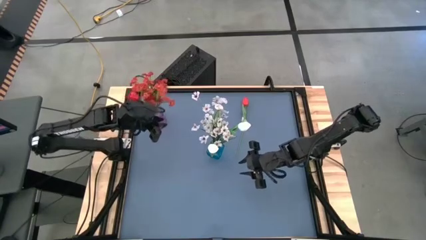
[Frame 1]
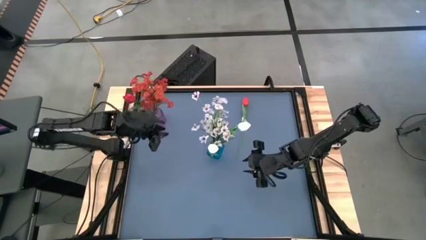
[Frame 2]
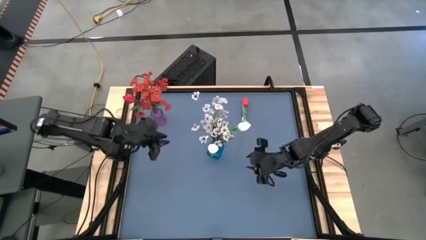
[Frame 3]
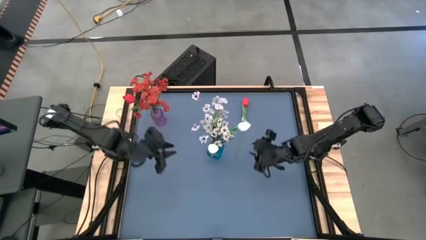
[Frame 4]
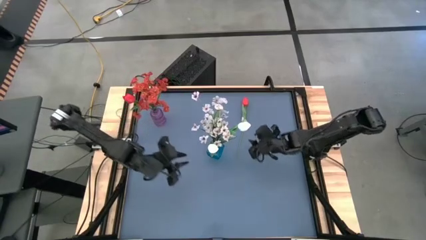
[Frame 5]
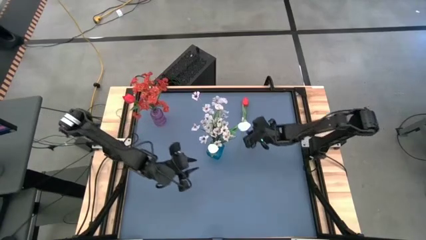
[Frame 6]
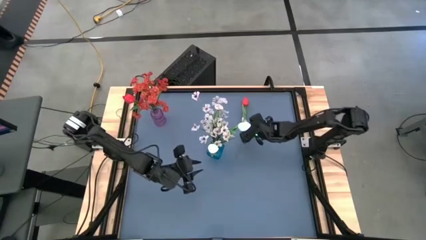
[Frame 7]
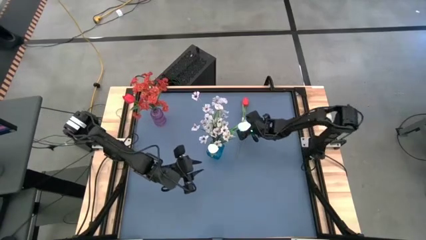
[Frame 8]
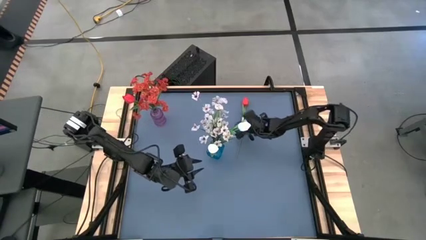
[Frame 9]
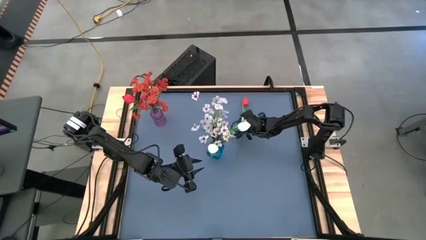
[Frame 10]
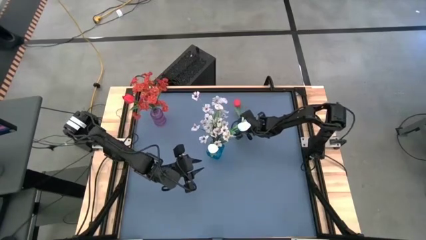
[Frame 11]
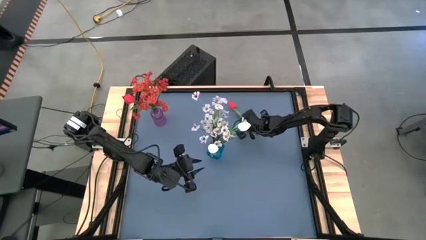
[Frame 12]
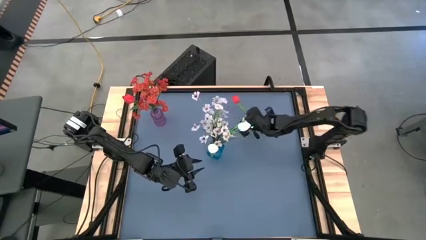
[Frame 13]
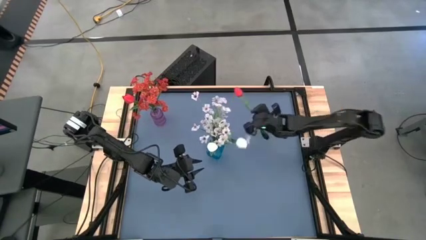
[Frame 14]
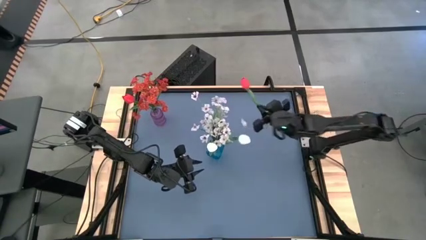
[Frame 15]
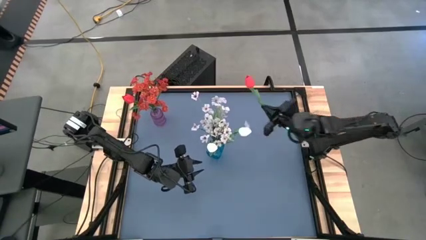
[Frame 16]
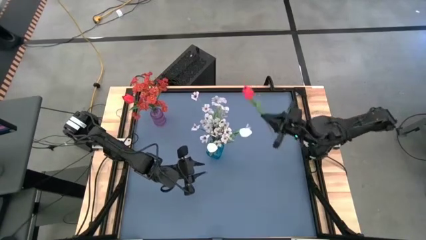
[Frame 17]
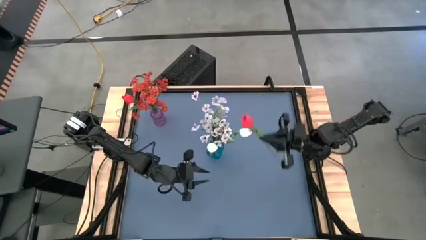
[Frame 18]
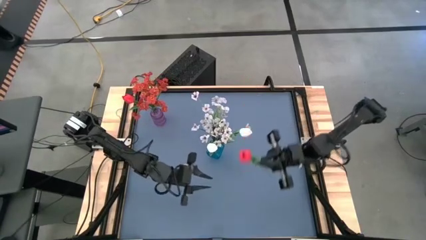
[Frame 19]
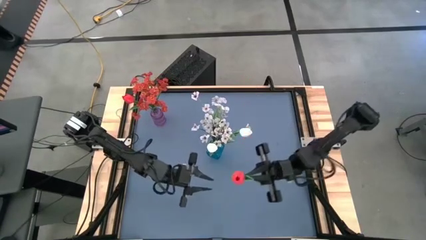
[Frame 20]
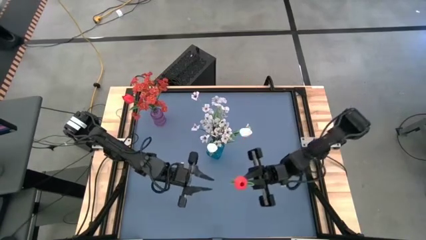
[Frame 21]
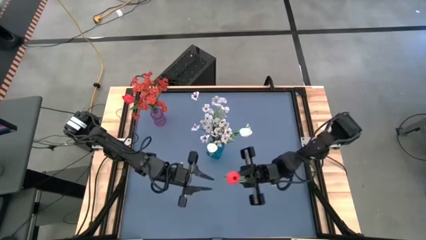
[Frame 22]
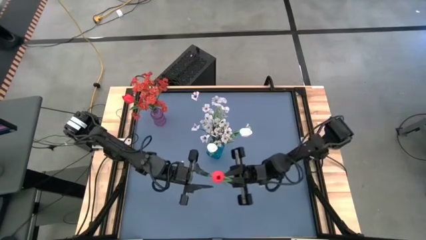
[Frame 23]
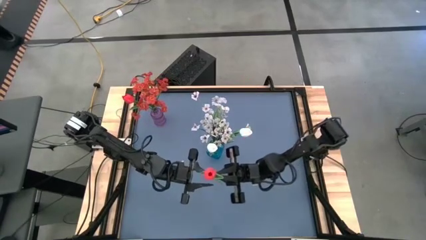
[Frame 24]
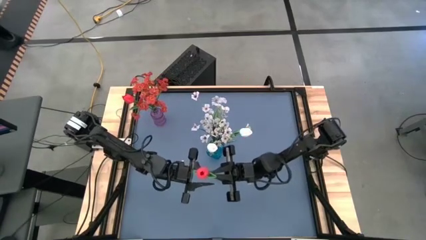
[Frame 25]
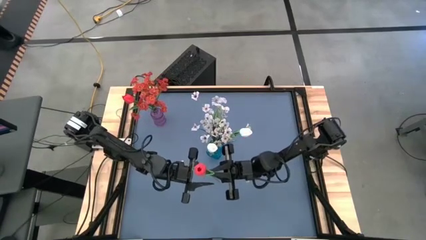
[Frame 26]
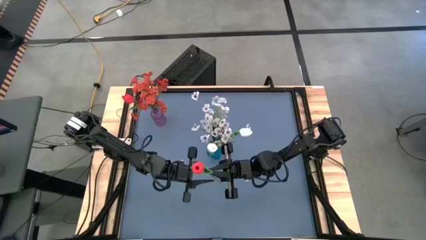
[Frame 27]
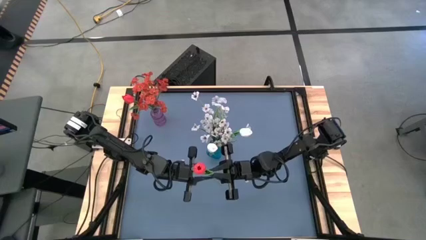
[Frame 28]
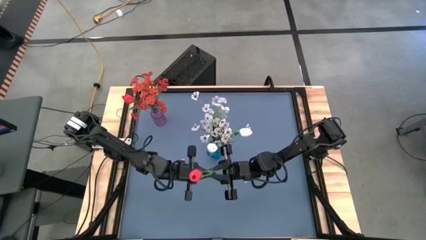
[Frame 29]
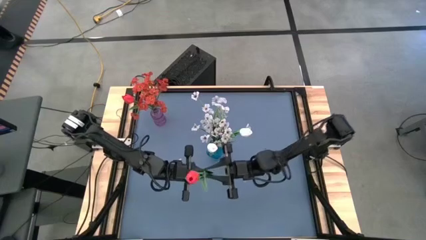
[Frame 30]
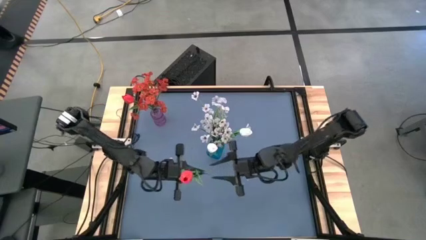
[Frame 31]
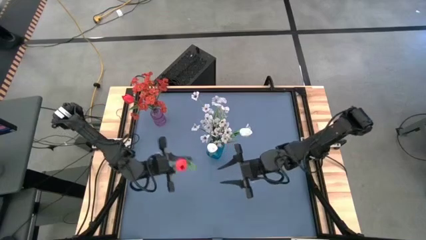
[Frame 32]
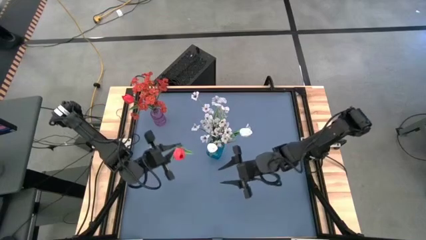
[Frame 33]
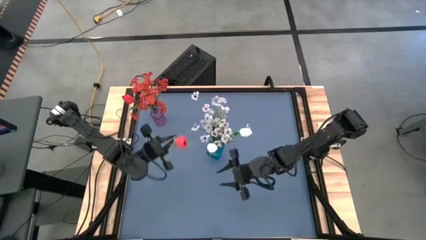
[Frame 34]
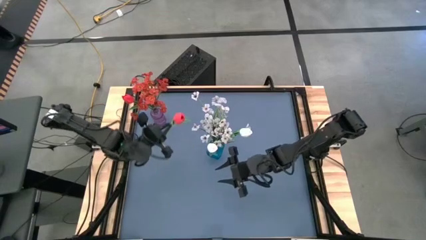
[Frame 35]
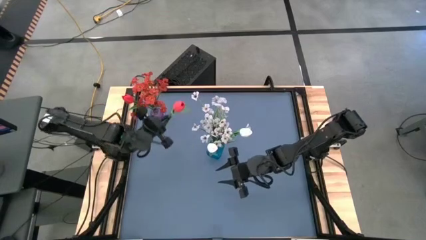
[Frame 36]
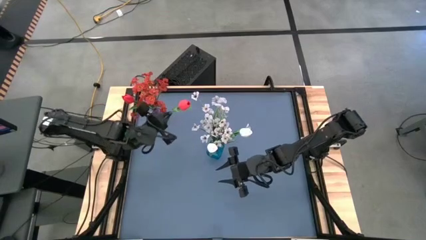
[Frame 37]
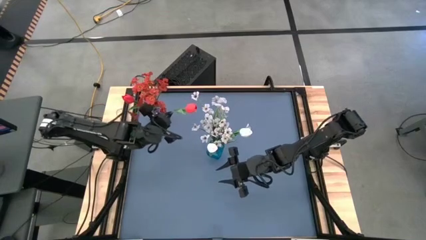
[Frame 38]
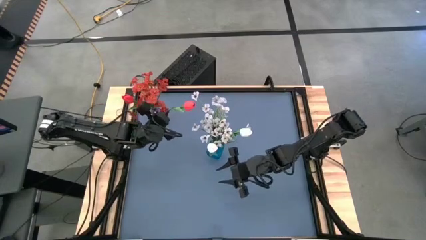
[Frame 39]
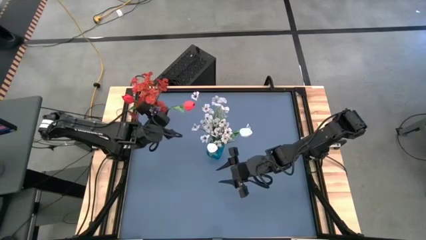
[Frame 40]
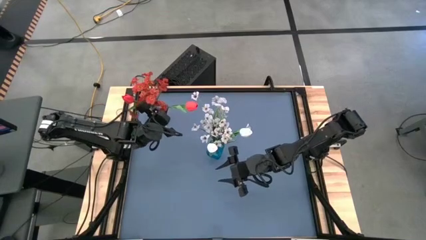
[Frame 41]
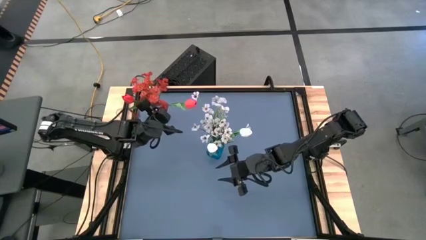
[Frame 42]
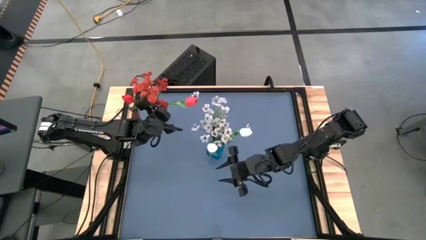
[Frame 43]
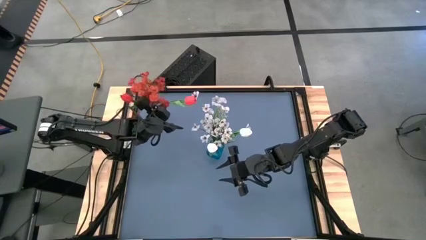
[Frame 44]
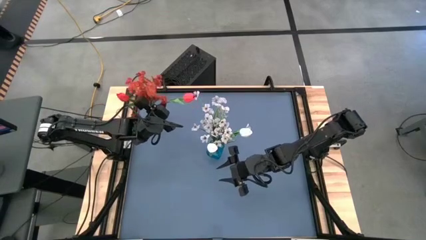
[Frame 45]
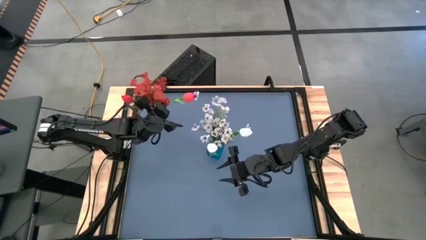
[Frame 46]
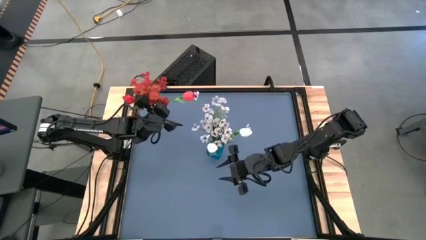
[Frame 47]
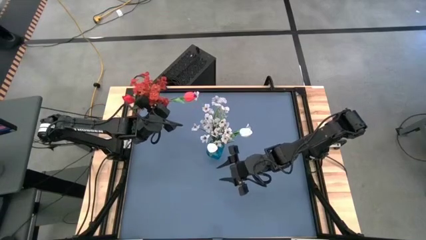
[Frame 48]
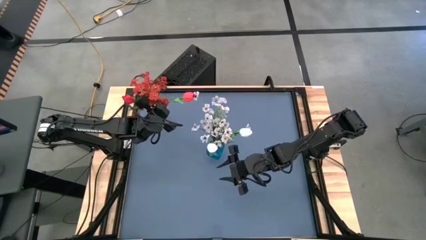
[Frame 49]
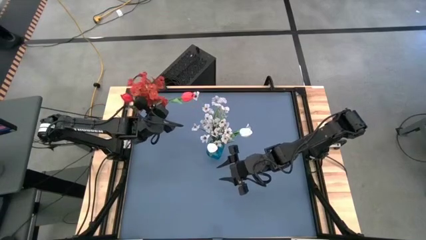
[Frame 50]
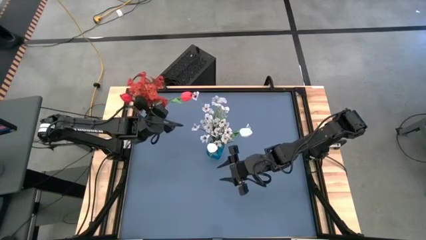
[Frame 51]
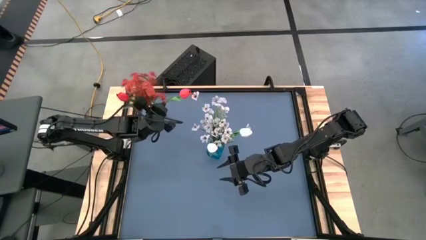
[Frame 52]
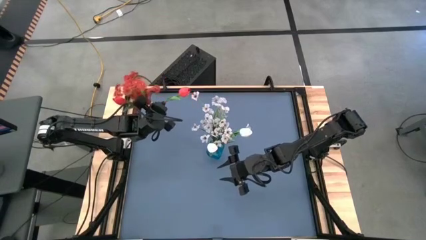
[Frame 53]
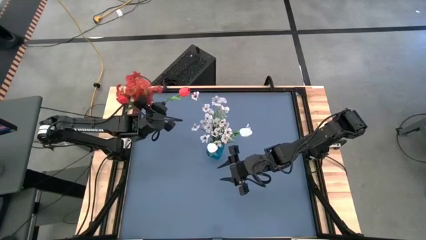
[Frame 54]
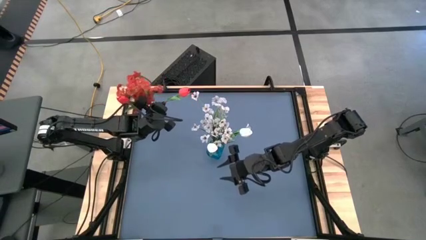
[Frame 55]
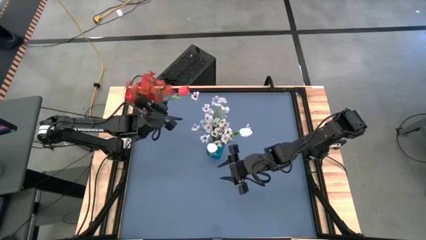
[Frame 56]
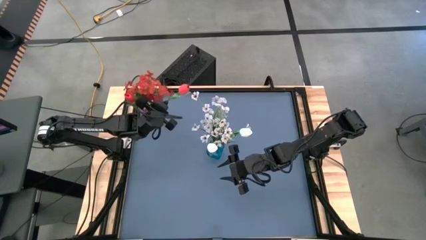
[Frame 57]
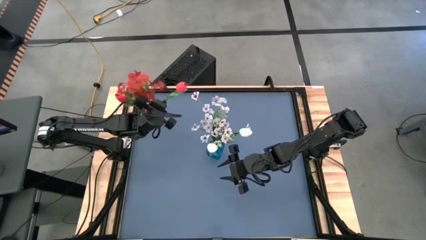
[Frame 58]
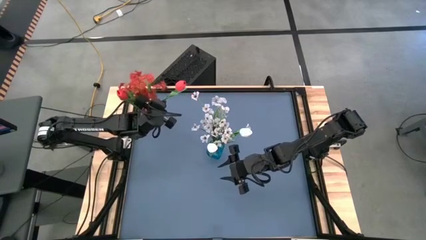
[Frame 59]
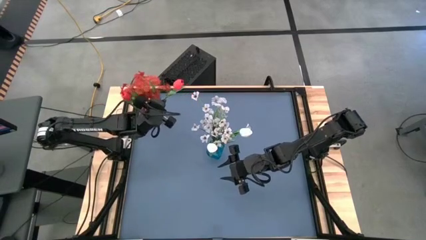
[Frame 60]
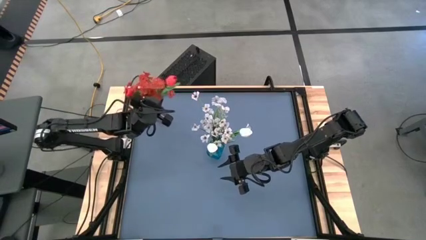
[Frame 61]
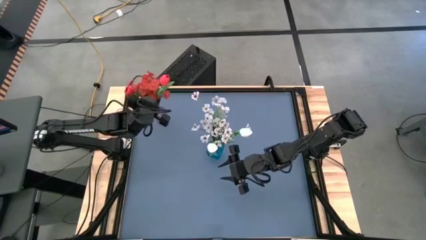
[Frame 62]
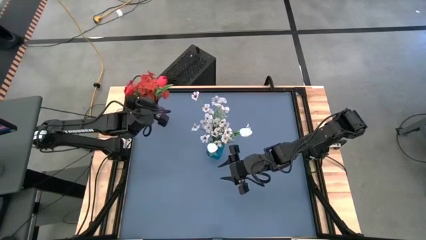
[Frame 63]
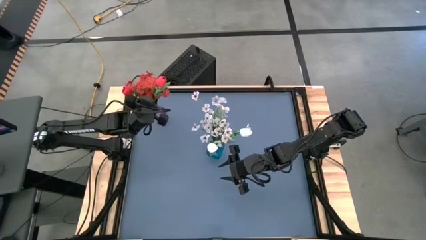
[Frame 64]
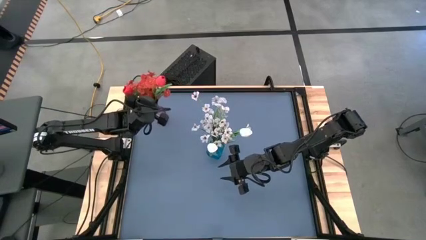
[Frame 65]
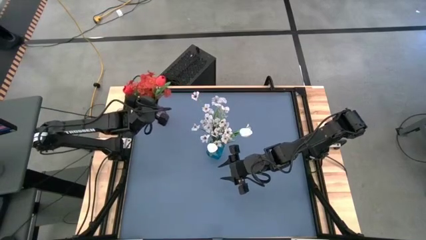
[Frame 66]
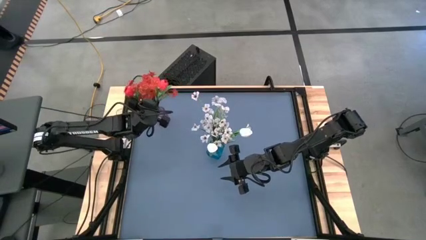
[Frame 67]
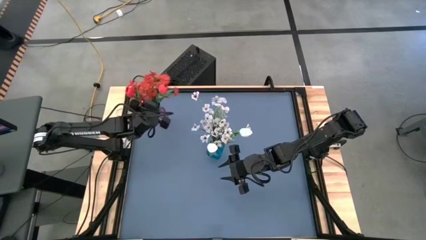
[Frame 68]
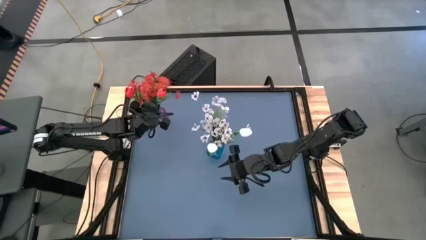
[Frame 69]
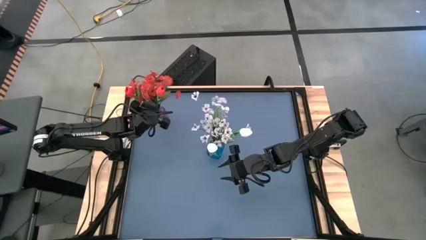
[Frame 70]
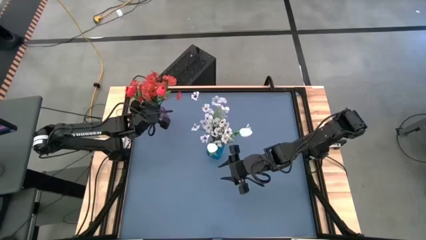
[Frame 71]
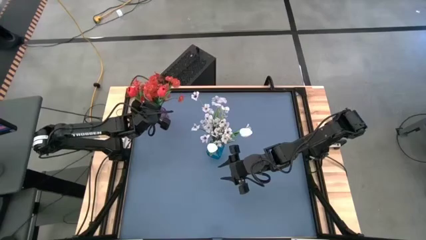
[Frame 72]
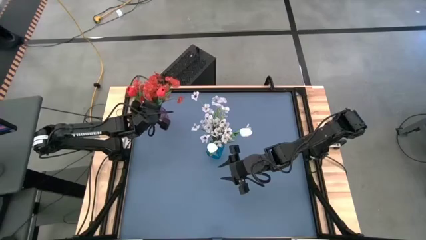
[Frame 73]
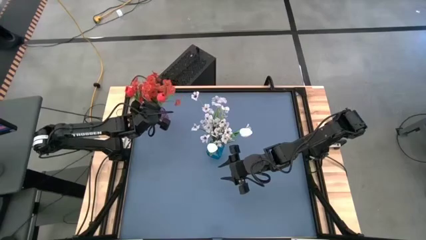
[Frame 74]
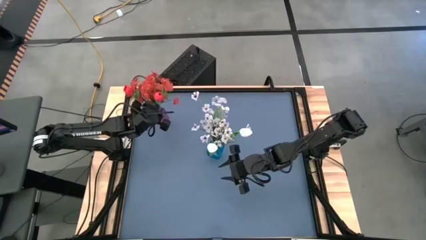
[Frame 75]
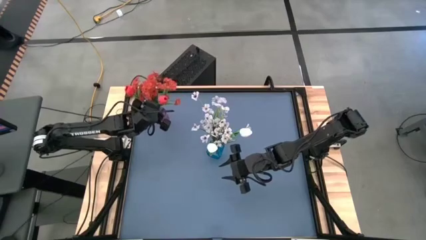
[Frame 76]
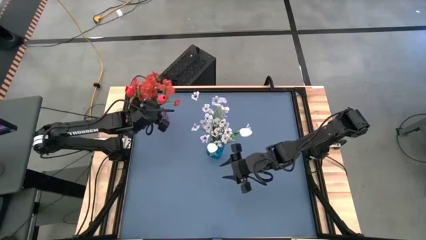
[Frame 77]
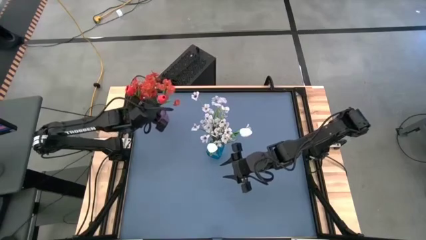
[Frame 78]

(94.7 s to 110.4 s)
Task: Sort flowers into vase by color
Put the red flower into the purple vase
